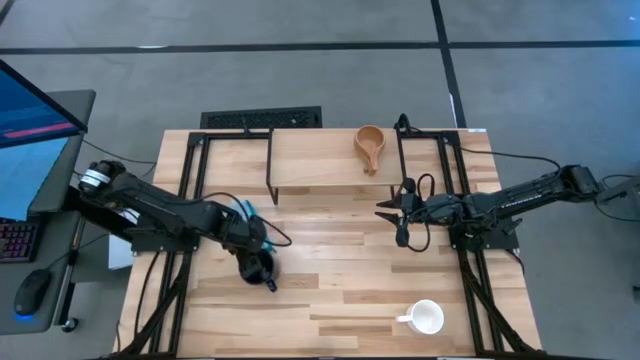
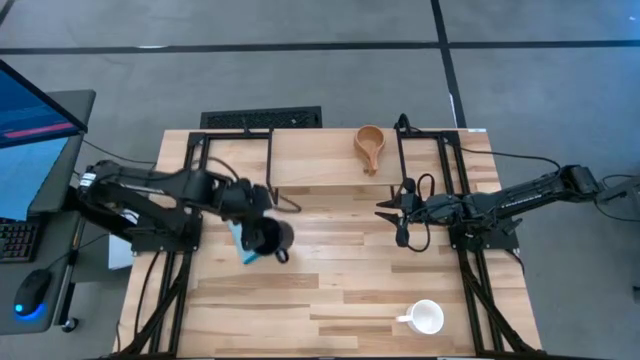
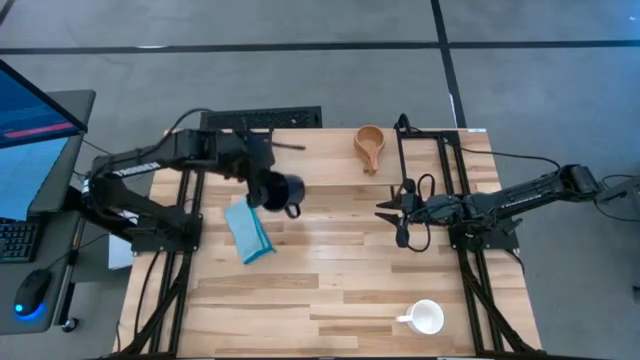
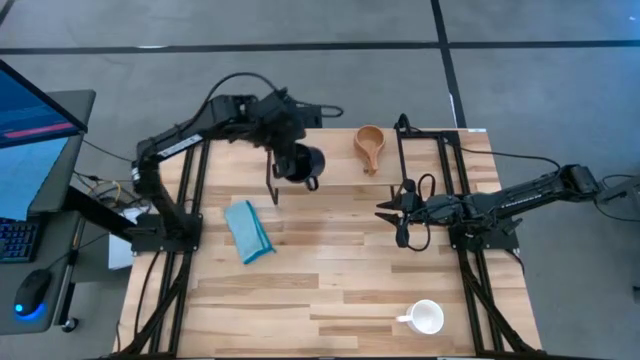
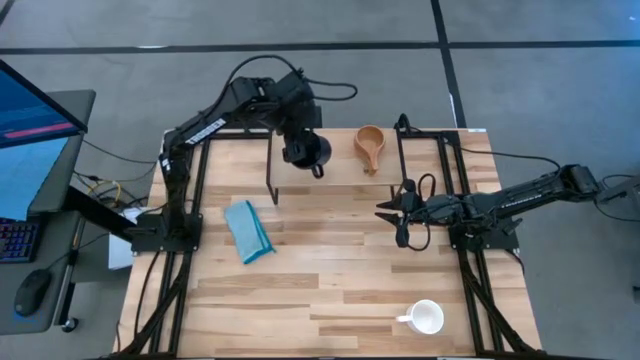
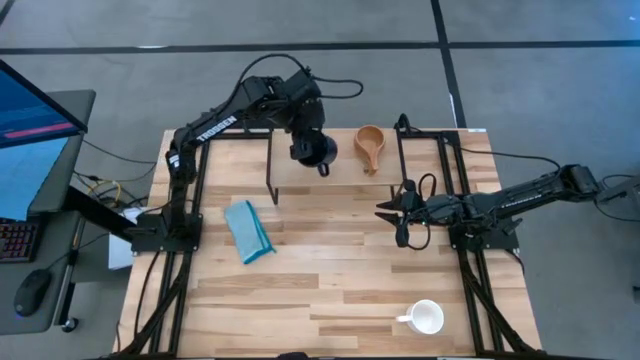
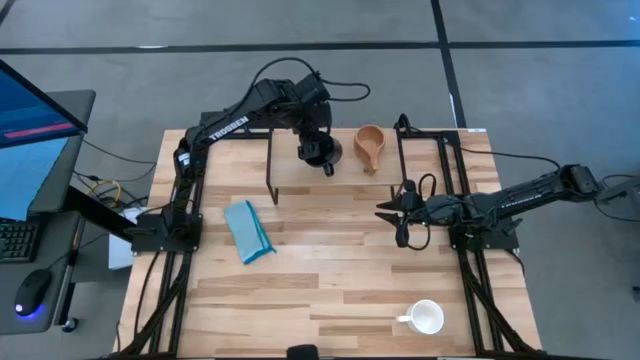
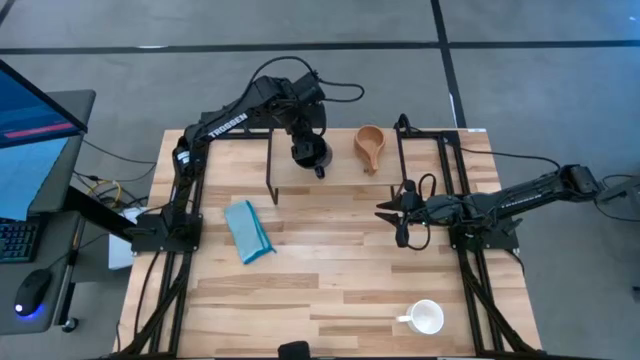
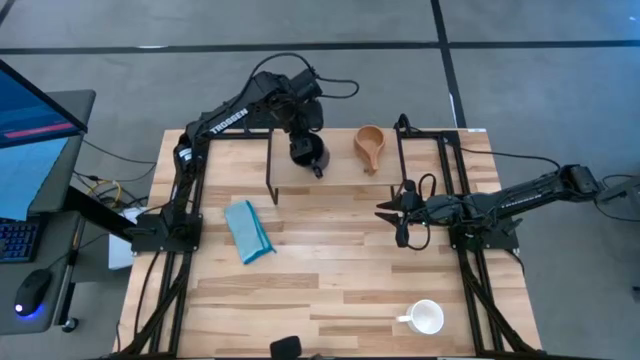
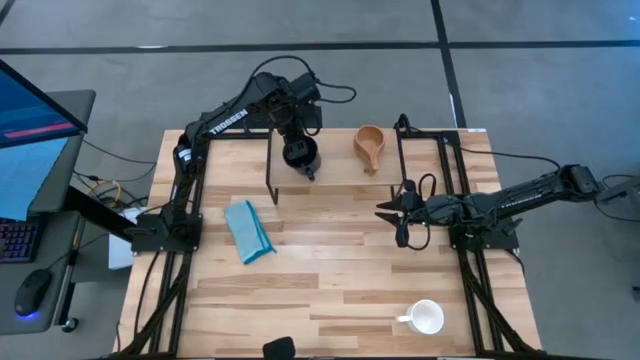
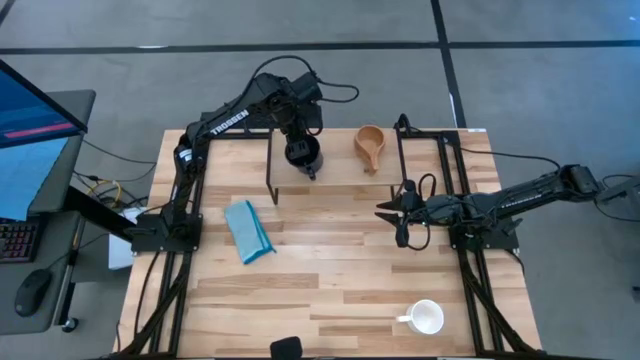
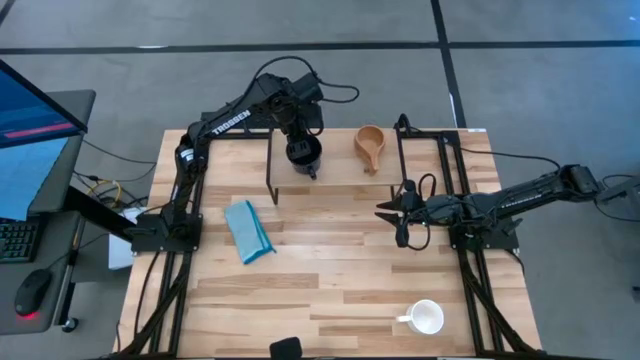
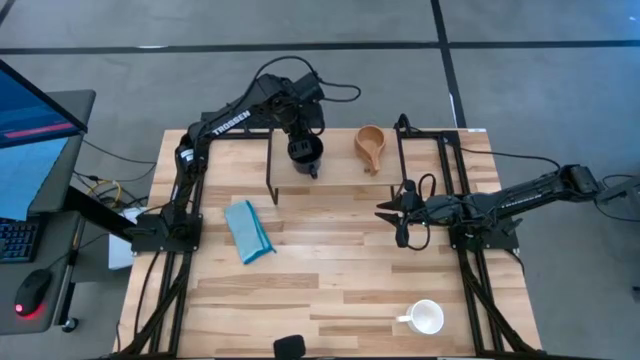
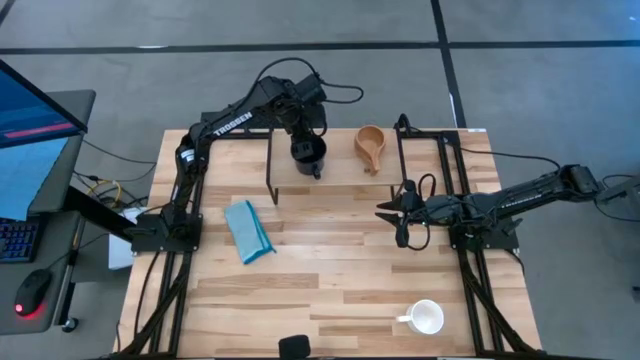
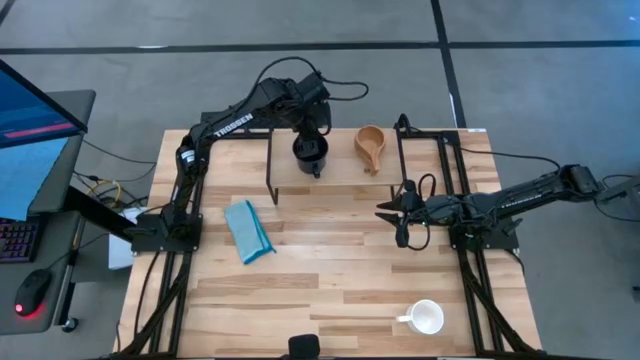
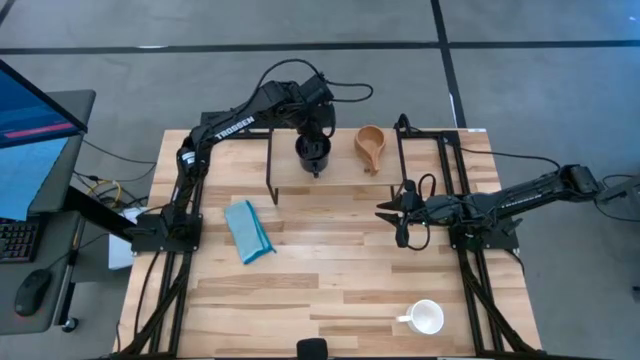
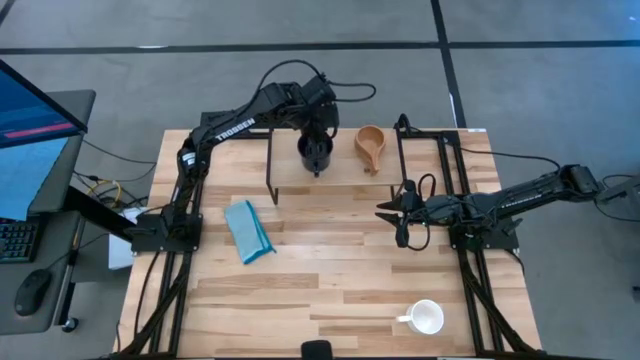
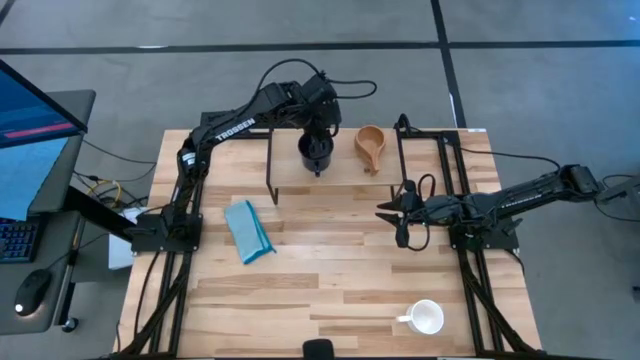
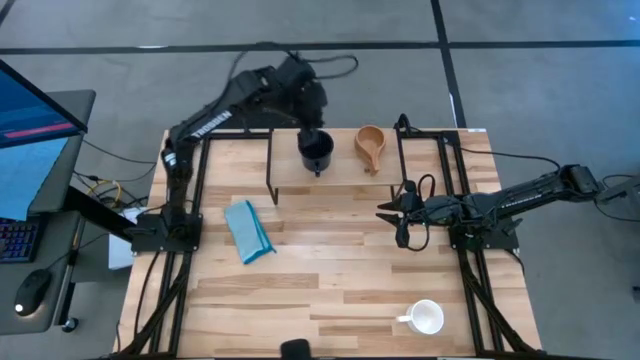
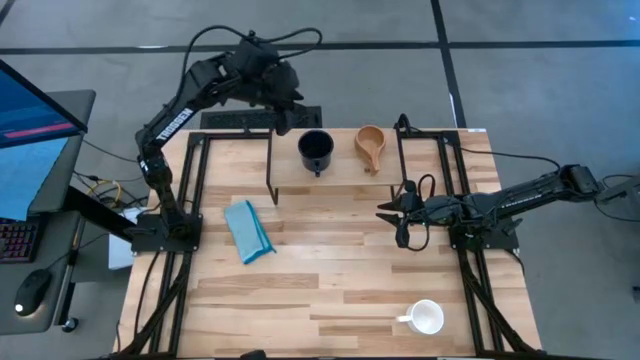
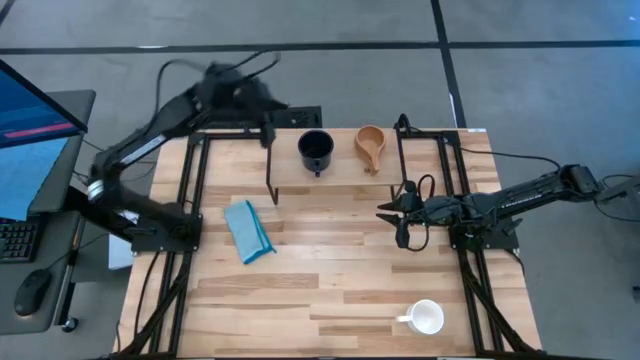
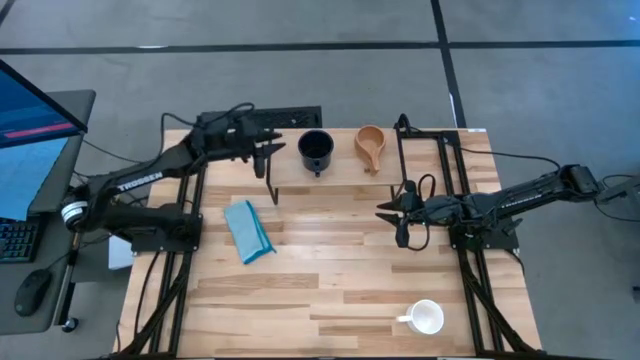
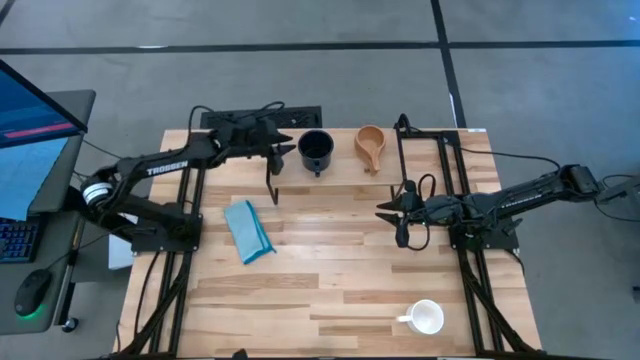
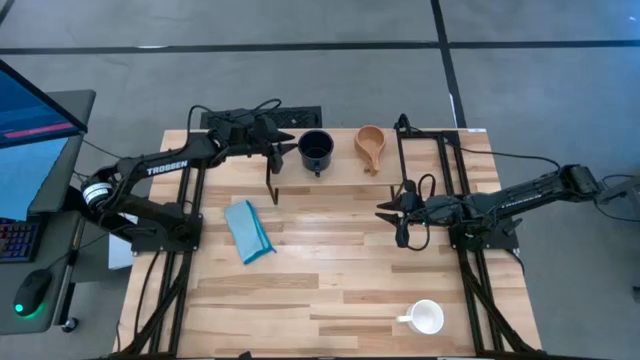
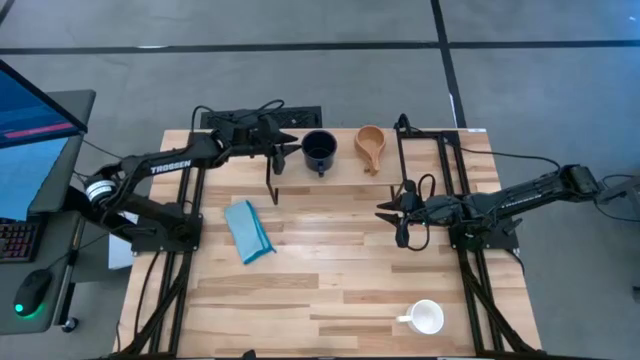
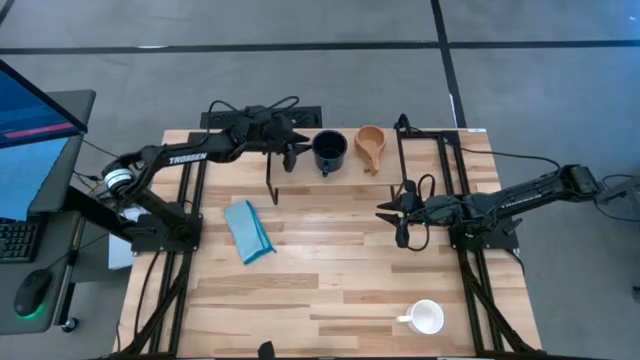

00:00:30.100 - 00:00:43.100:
Task: Stack small to large cups/mugs on shelf
Put the black mug on the shelf

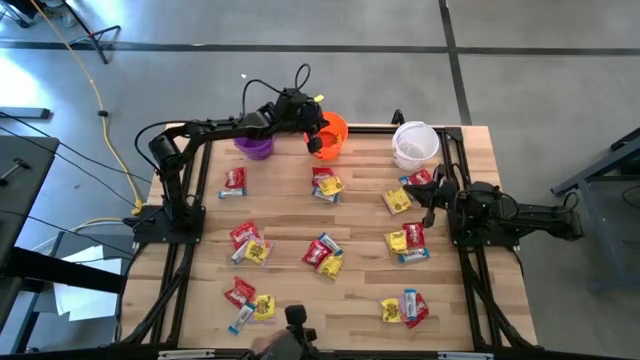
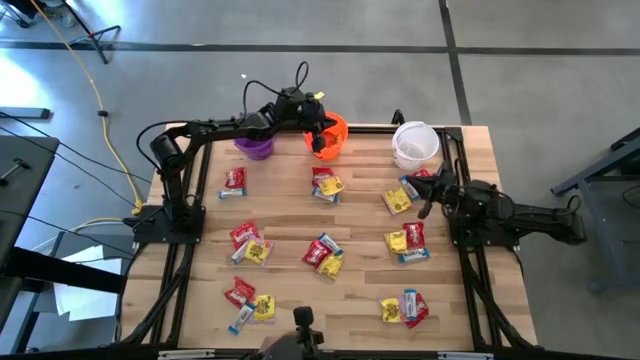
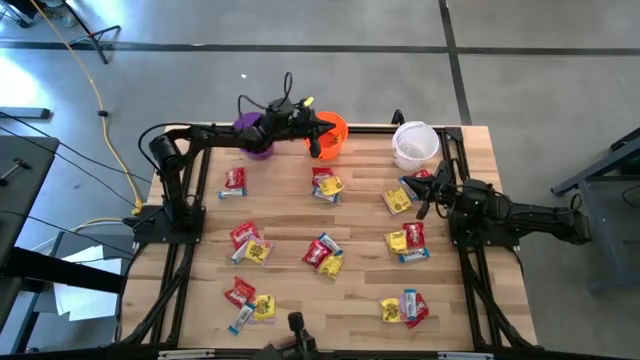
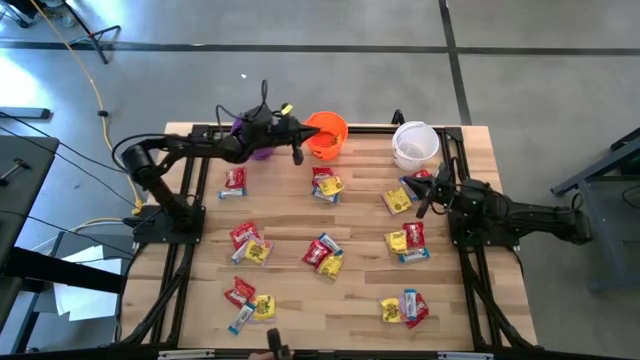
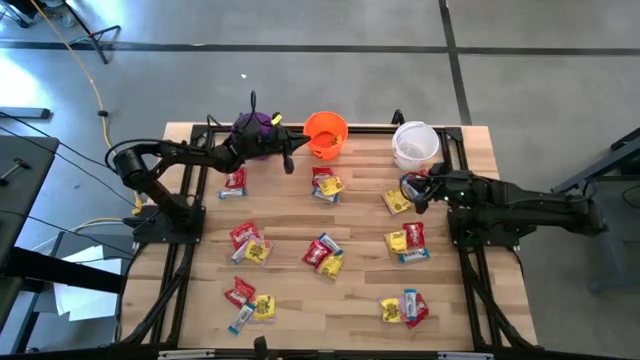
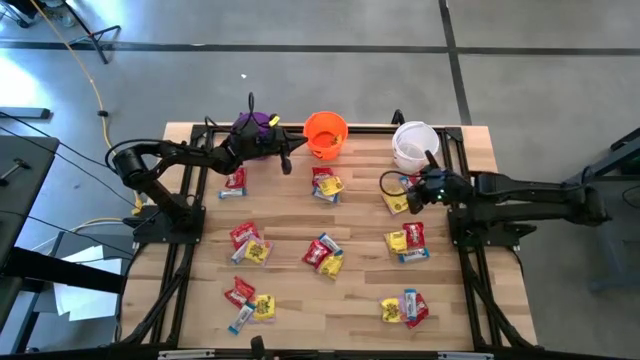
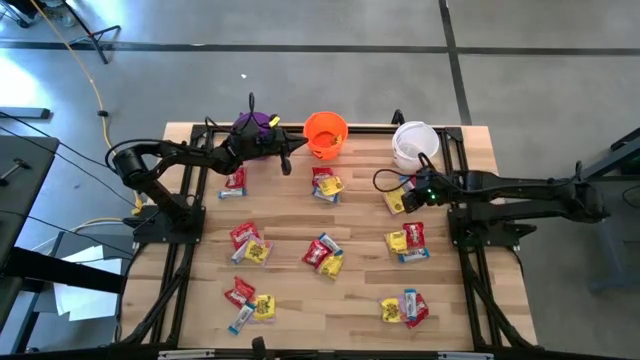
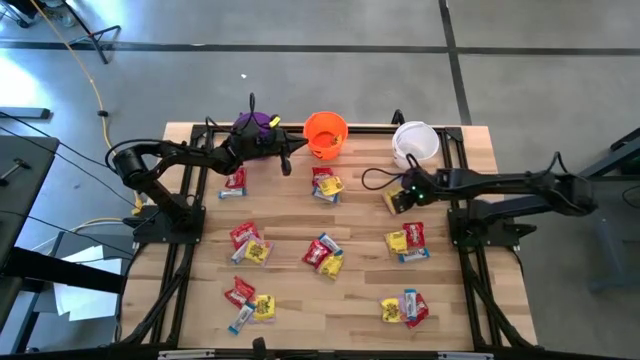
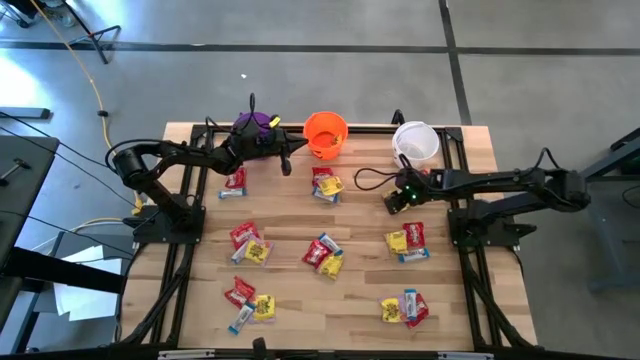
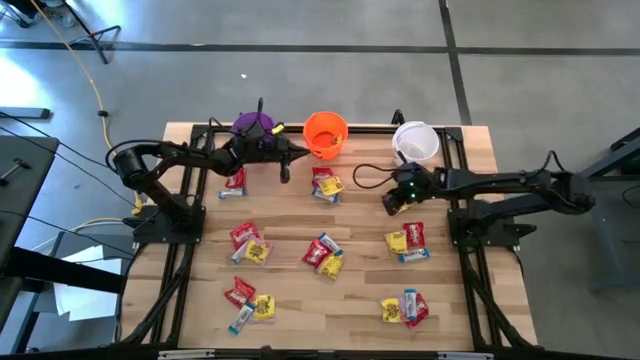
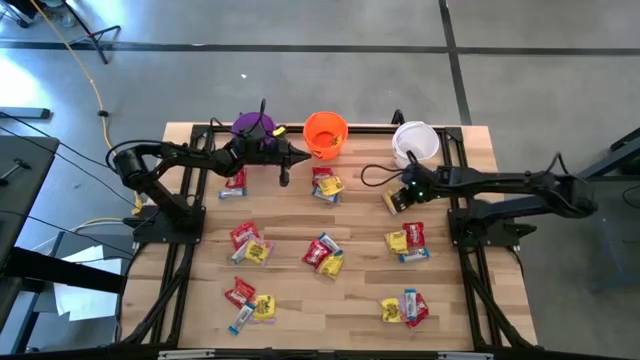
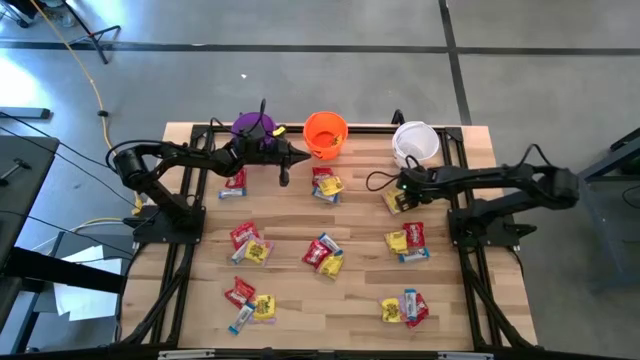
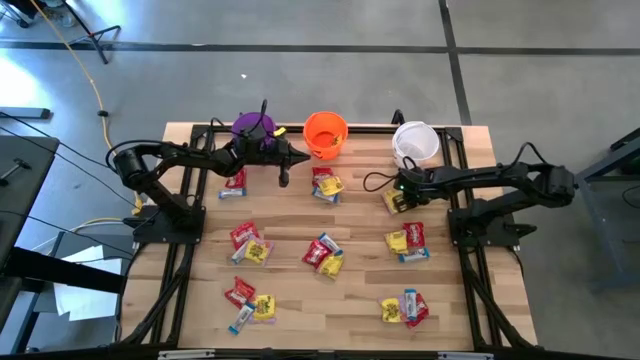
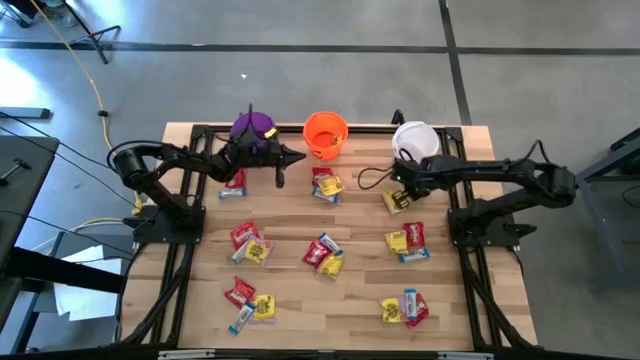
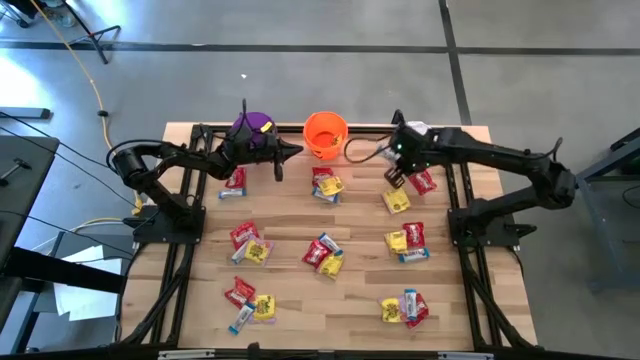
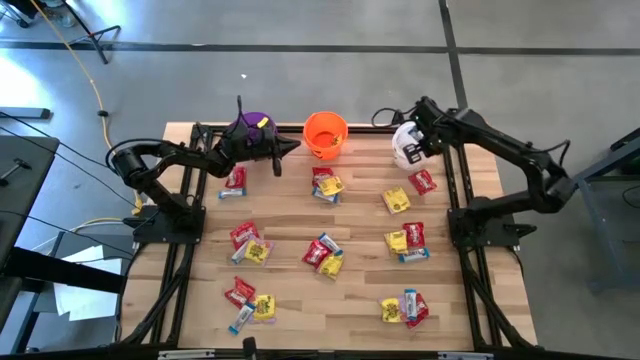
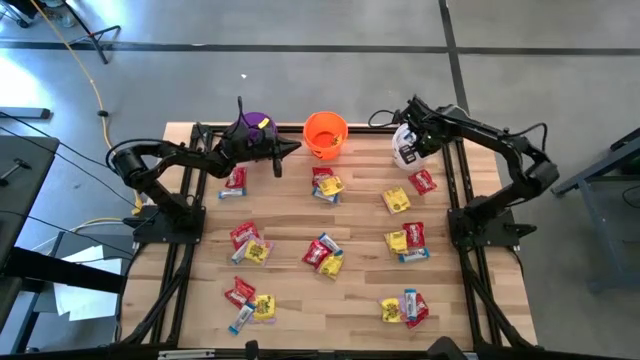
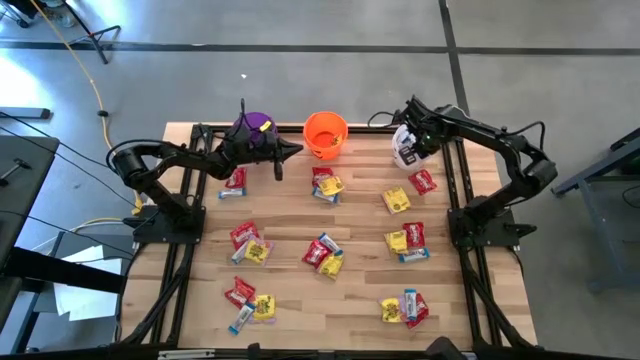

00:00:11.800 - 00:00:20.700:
Task: Sort candy
Put the white chocolate bar into the white bucket
